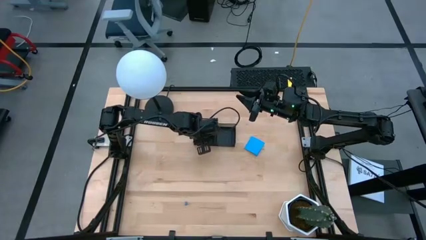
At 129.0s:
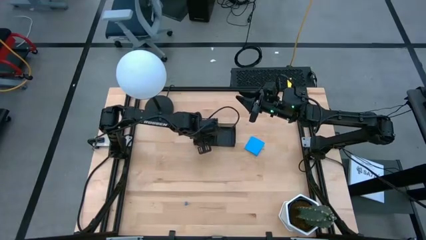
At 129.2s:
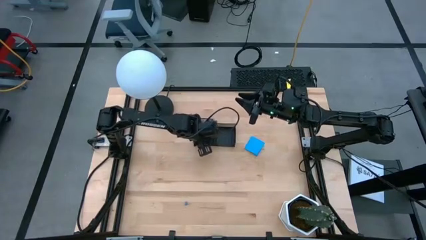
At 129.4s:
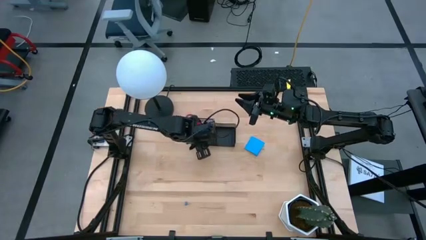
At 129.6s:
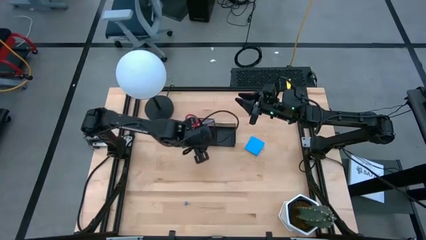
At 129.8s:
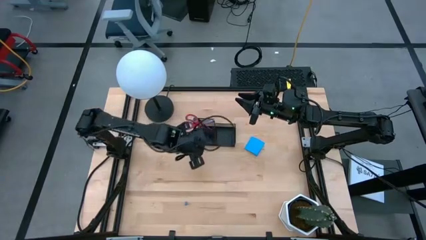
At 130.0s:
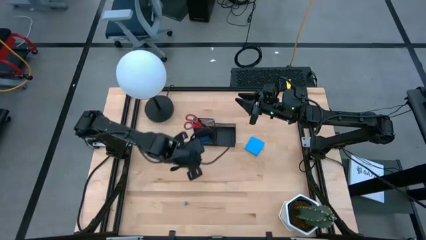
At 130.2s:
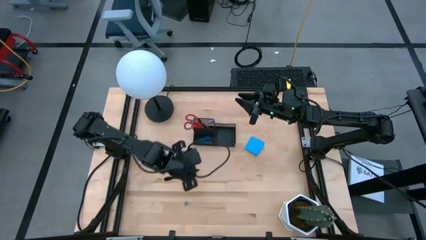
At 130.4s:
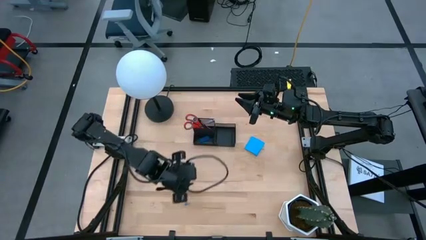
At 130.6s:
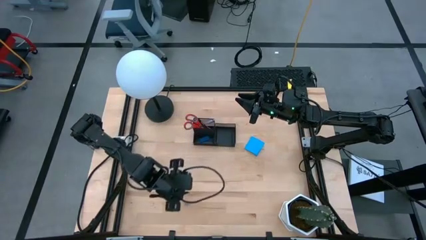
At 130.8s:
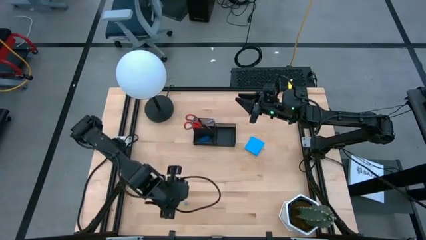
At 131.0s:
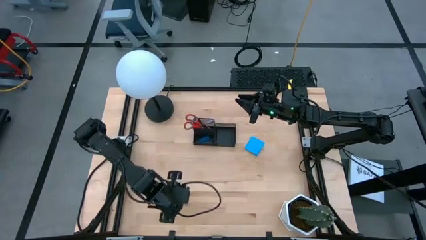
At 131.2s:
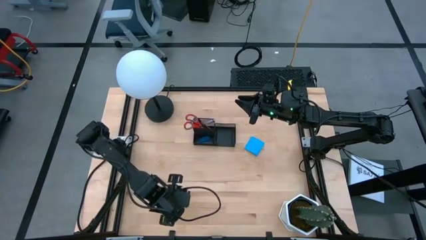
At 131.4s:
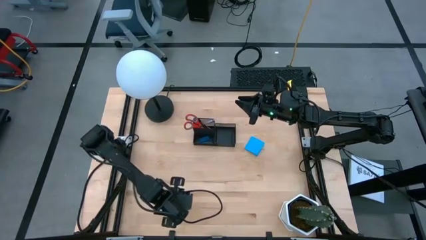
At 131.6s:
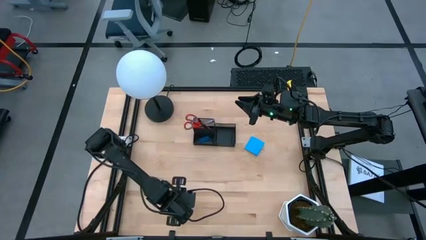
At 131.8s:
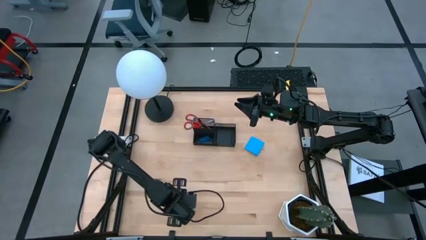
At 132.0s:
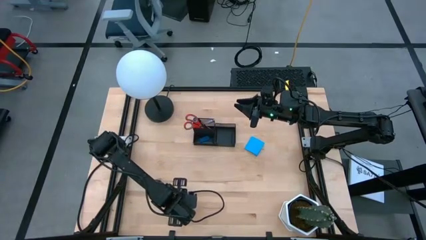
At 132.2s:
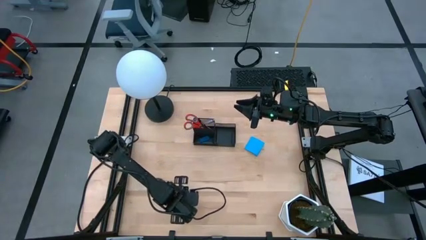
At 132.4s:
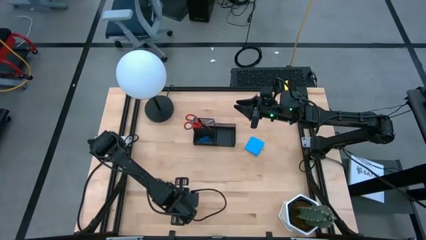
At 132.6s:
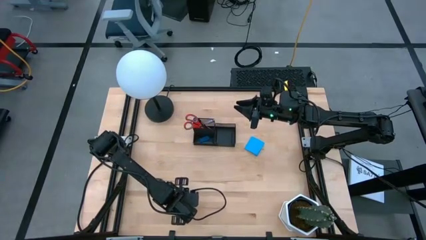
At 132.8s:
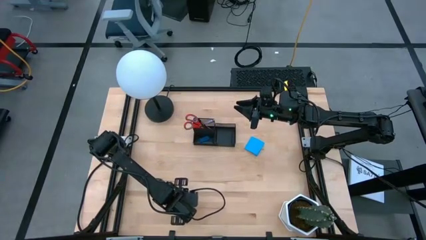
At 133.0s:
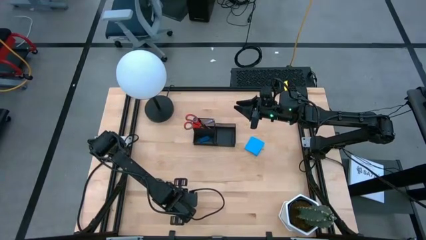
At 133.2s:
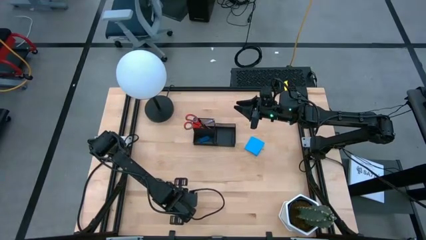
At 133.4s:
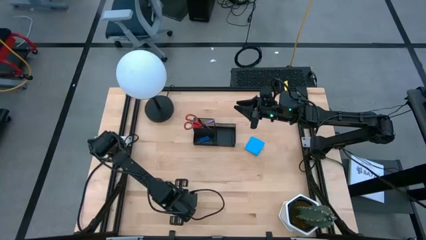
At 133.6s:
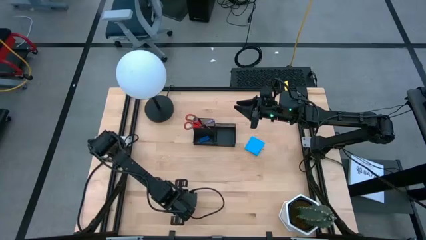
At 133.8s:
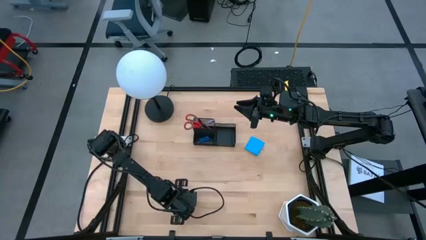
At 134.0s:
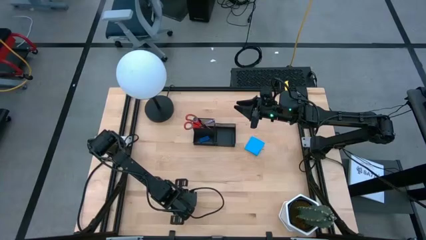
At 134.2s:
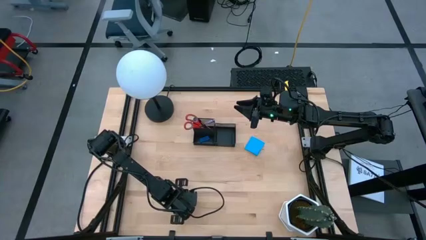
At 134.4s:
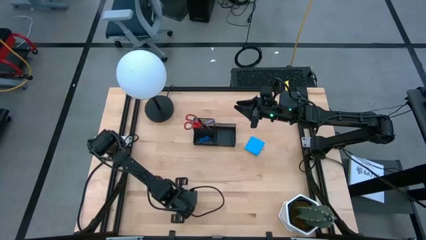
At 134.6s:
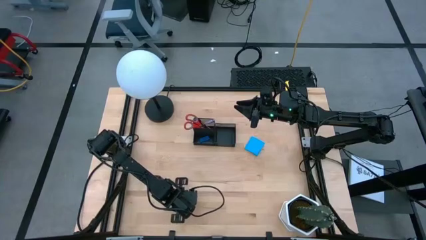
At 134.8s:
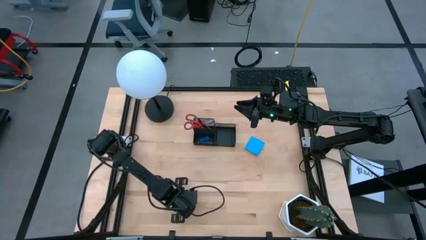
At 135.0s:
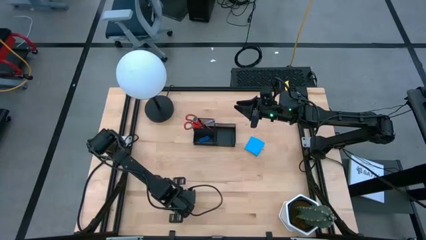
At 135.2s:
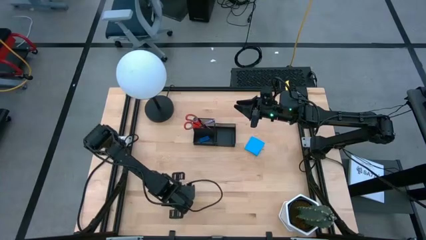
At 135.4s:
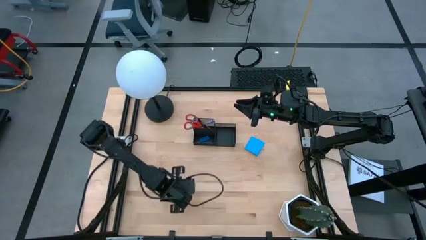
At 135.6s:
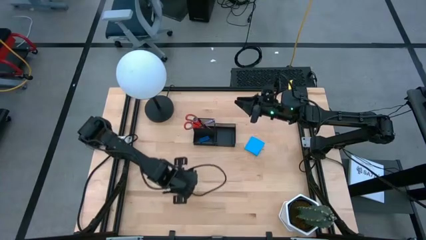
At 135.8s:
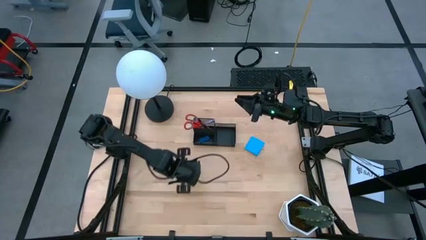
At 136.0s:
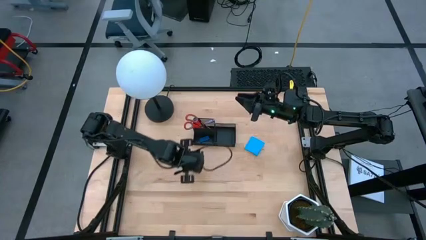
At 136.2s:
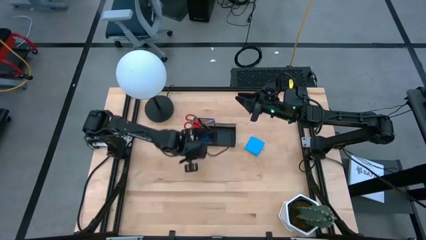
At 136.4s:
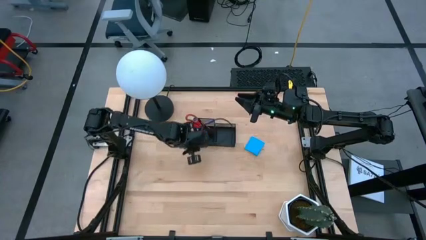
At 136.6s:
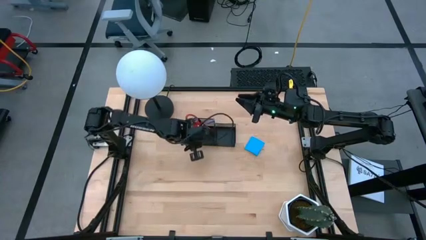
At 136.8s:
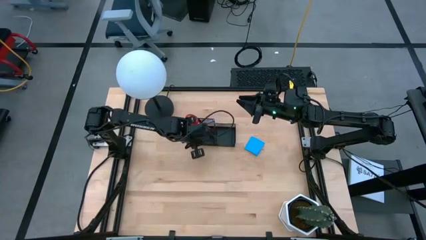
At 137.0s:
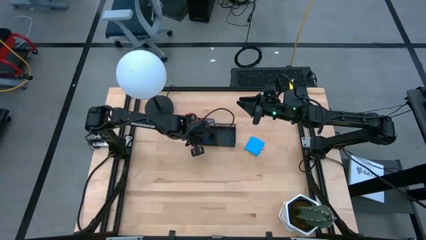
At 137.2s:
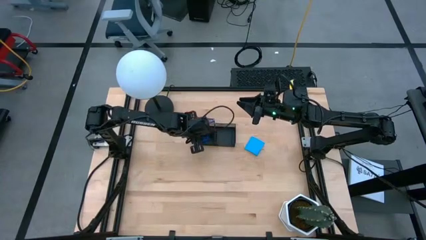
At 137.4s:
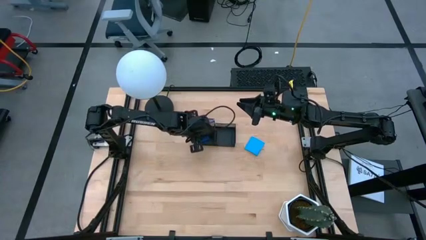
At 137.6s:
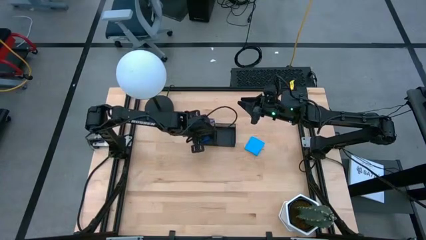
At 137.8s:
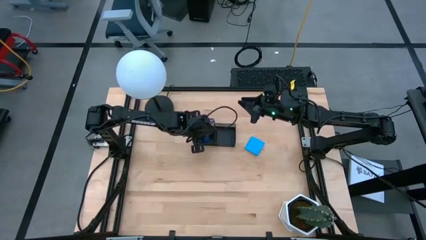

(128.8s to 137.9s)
Task: Pick and place office supplies into organizer
Put the blue binder clip into the black desk organizer

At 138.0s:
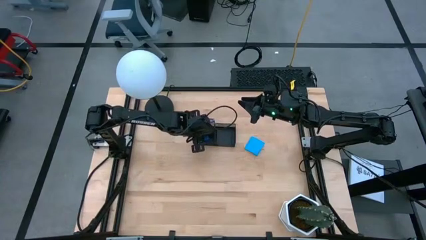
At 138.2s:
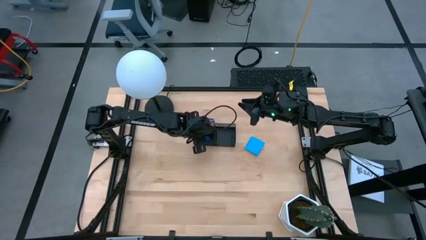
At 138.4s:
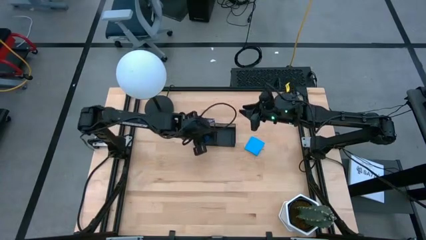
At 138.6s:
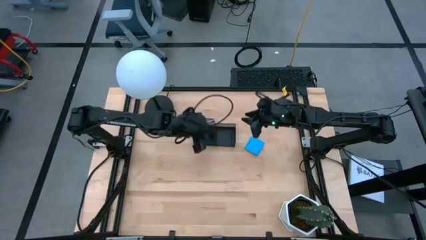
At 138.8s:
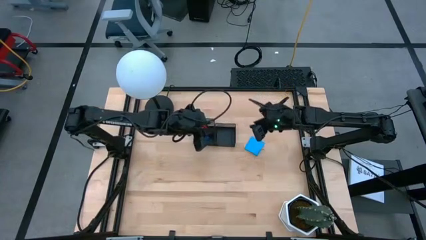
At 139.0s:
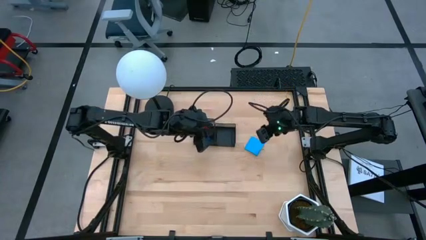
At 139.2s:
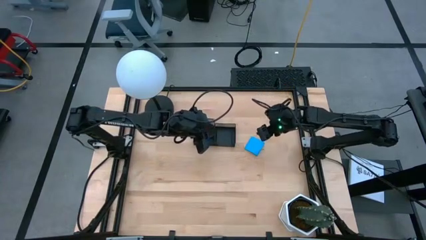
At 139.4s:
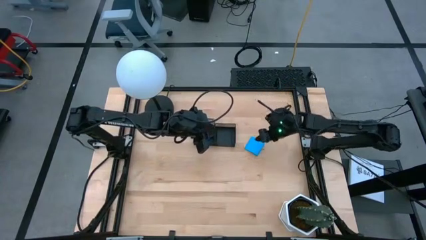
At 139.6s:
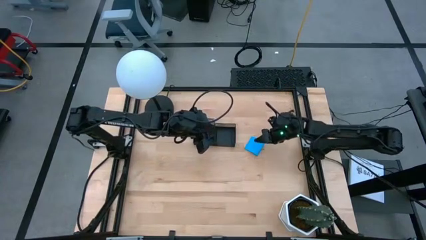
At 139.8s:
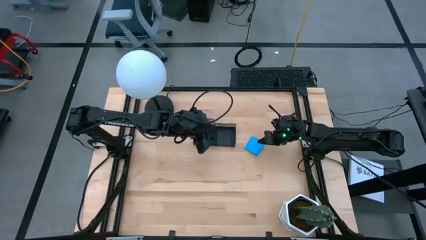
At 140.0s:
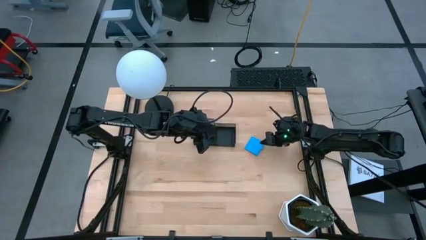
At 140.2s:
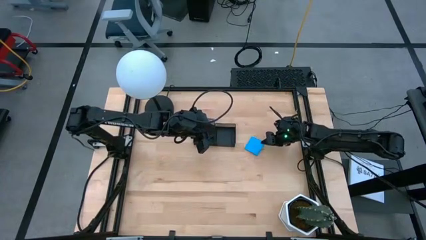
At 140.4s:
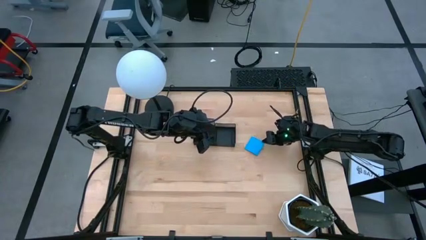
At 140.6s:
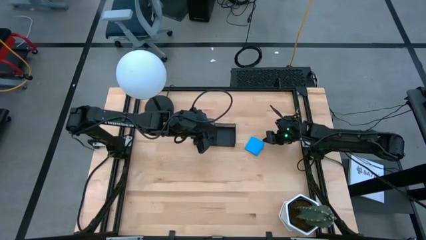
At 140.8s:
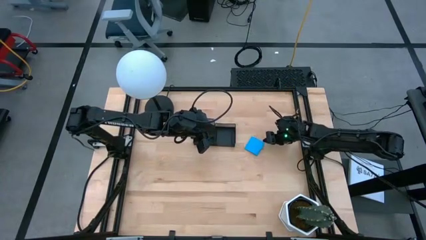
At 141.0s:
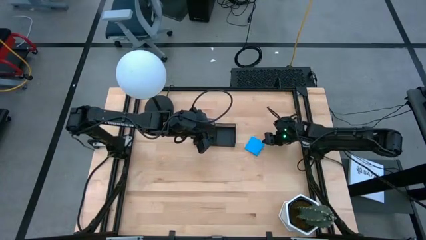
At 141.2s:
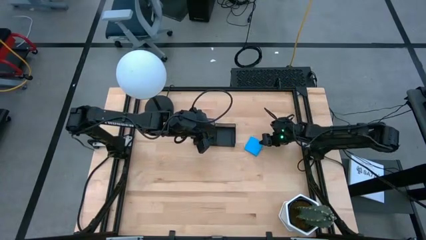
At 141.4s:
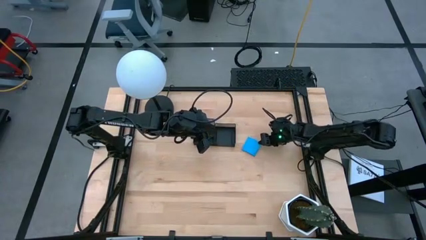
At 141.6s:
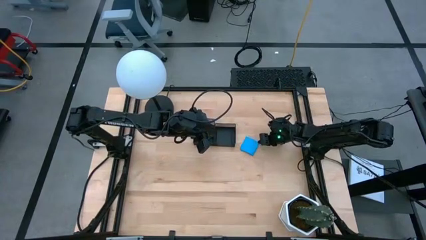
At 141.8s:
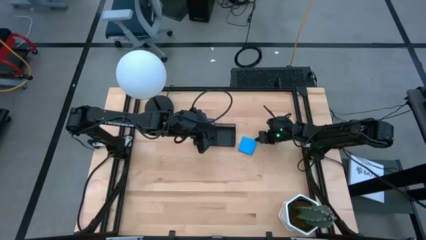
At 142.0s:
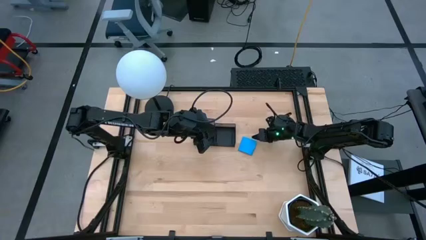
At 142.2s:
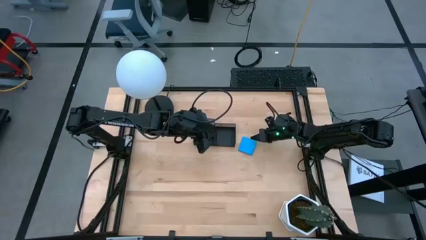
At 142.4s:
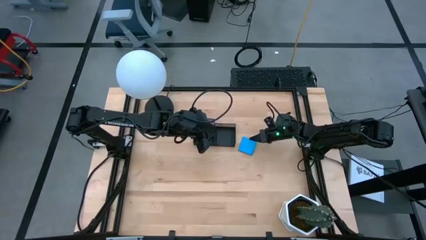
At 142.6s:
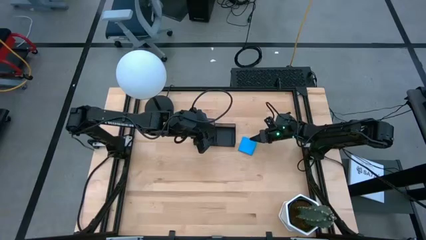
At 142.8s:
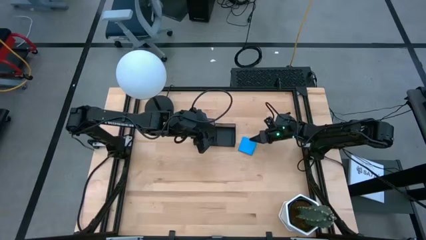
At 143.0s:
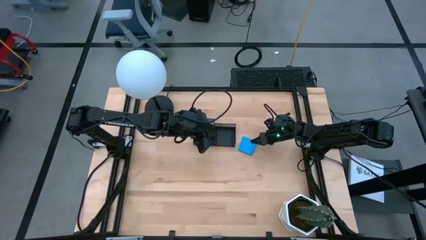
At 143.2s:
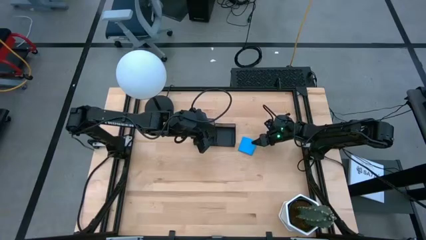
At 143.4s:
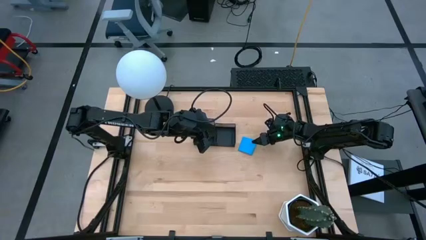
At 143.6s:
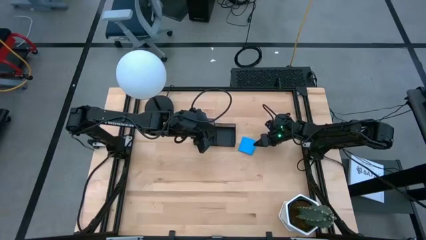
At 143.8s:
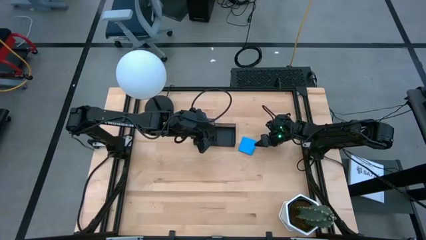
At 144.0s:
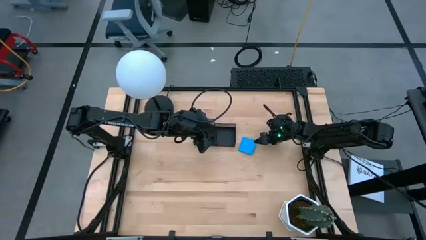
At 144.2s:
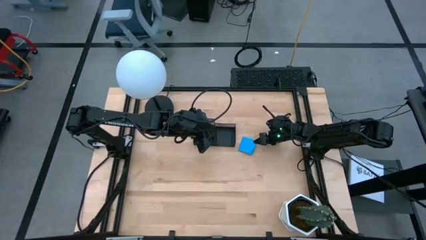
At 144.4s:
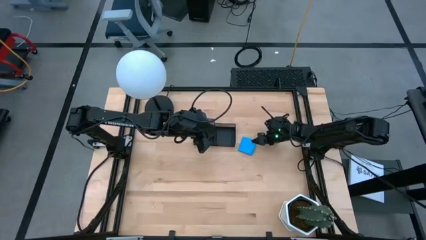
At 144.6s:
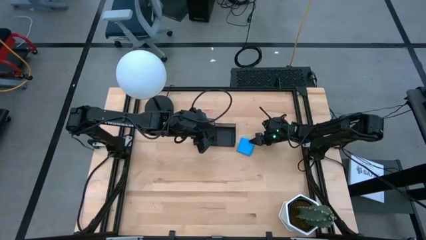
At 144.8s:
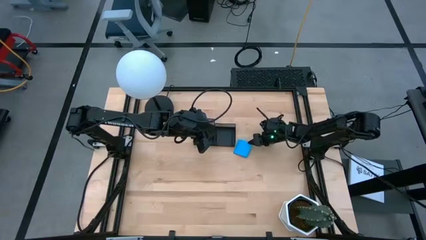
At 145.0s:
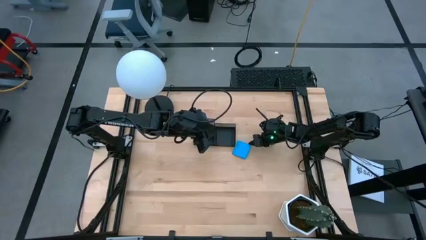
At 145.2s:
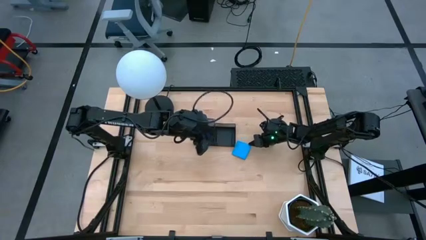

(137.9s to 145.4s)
Put the blue sticky note into the black desk organizer
